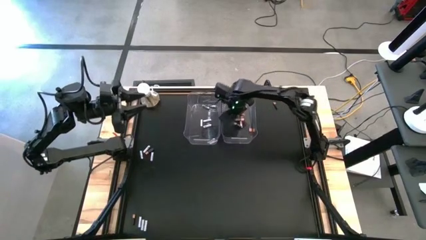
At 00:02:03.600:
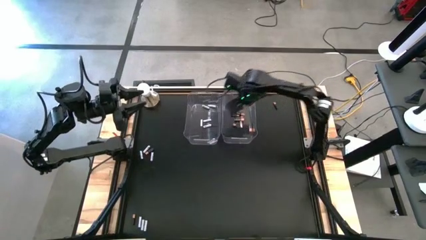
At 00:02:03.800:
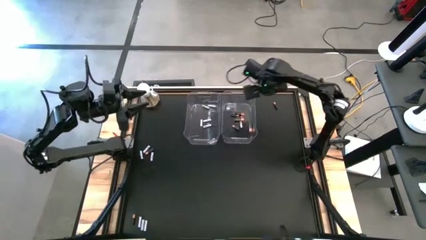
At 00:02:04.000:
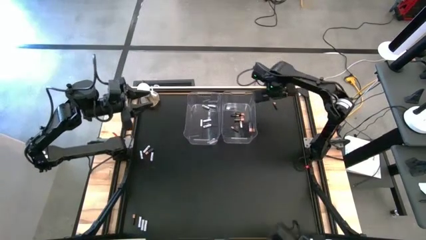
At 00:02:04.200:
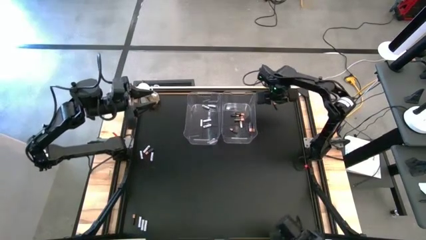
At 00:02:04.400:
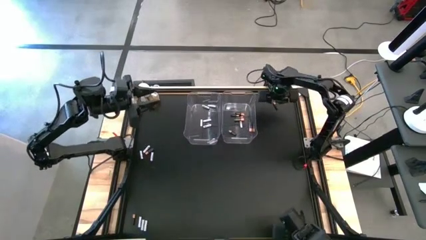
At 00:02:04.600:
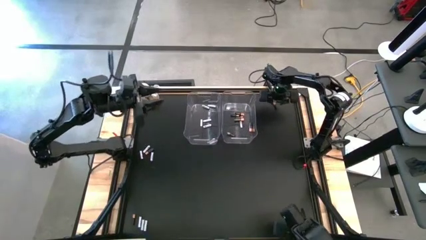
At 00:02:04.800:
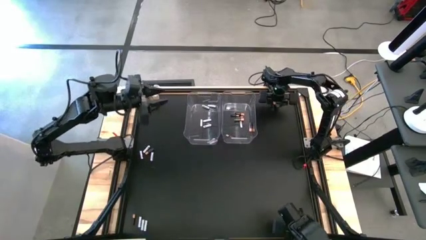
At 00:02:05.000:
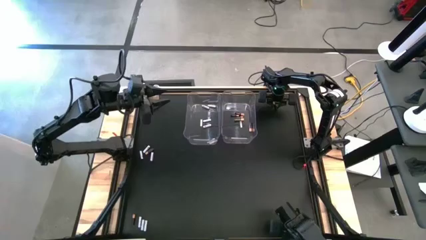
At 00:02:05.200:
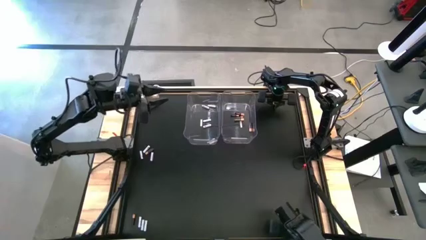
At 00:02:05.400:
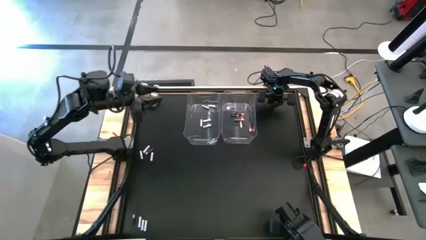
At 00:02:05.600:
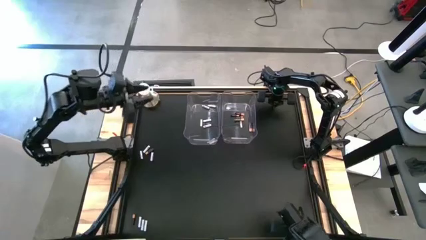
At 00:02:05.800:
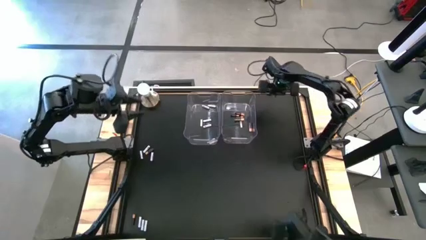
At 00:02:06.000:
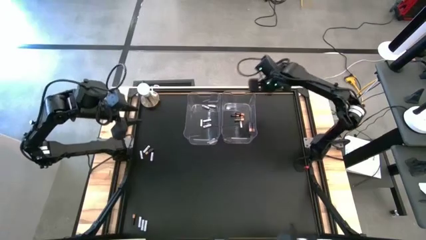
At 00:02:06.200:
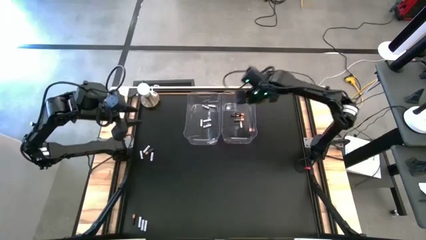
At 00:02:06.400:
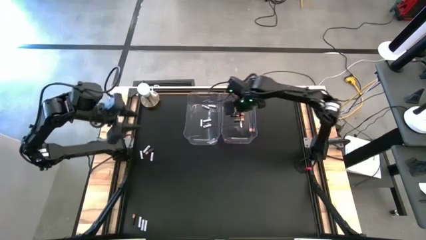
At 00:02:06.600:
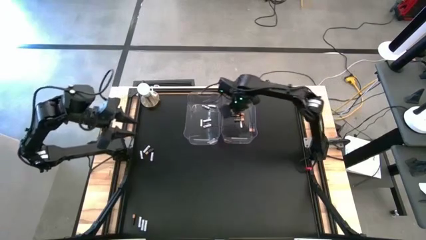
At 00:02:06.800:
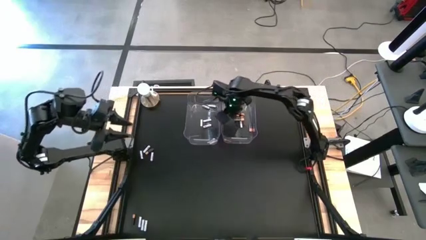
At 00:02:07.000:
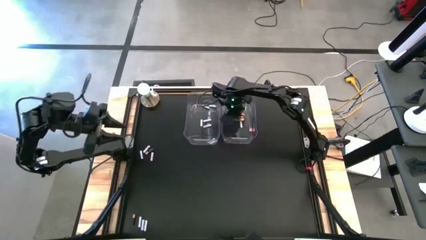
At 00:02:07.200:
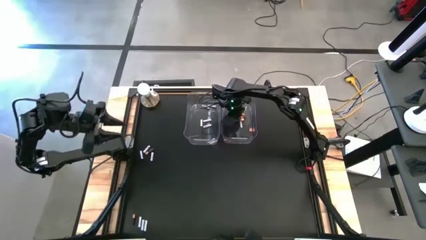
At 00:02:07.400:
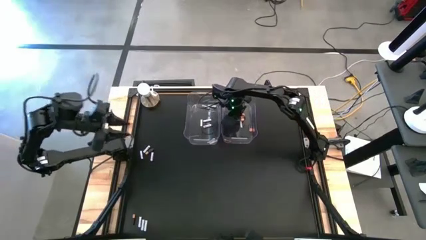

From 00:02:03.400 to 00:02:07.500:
Task: Sort batteries
Put the brown battery into the right transparent bin

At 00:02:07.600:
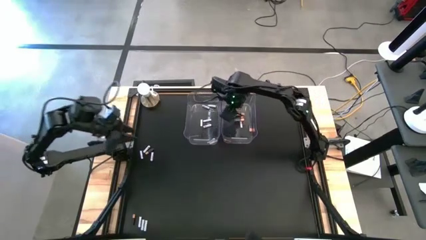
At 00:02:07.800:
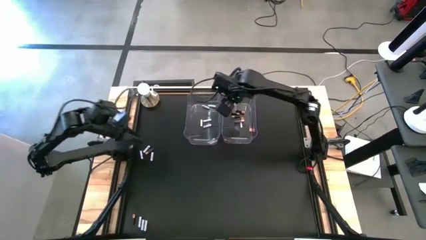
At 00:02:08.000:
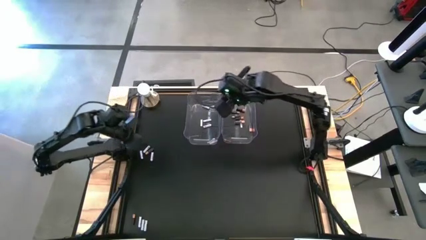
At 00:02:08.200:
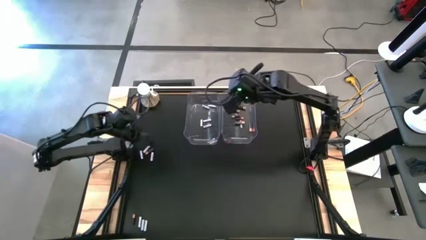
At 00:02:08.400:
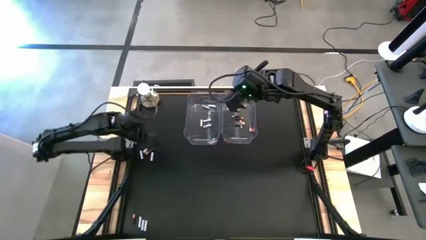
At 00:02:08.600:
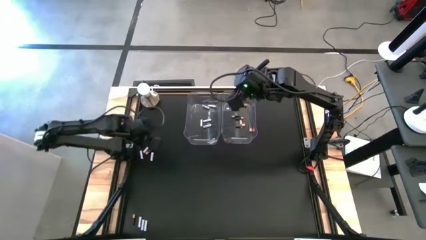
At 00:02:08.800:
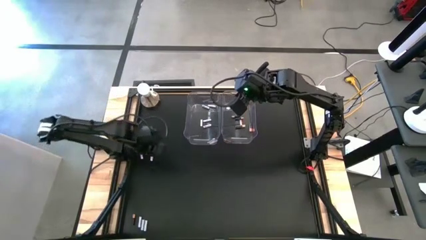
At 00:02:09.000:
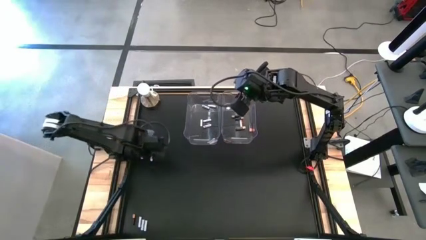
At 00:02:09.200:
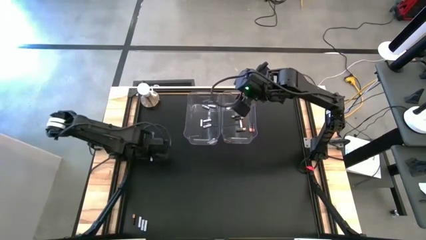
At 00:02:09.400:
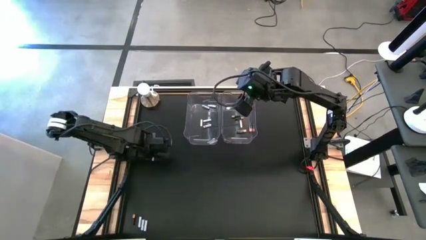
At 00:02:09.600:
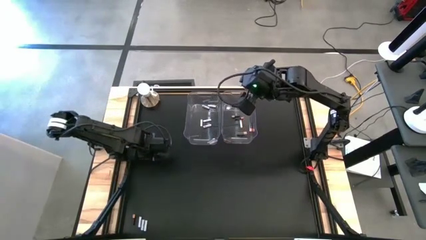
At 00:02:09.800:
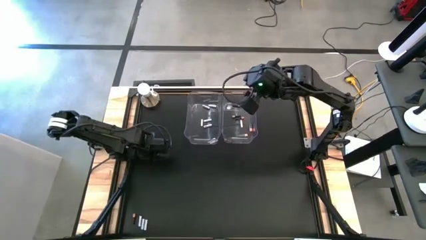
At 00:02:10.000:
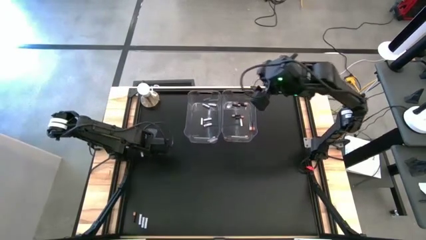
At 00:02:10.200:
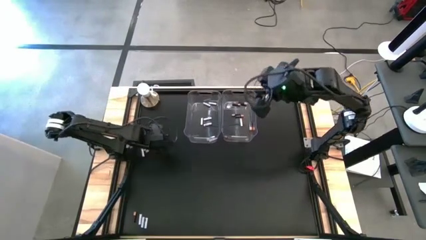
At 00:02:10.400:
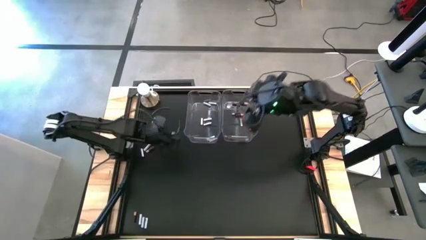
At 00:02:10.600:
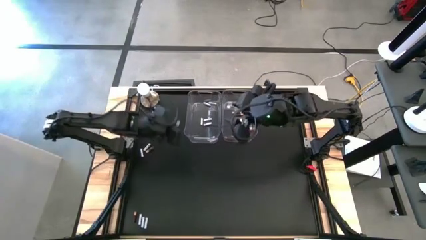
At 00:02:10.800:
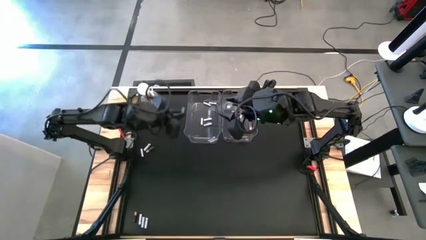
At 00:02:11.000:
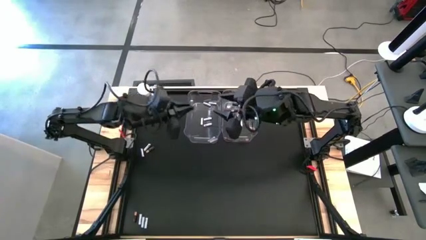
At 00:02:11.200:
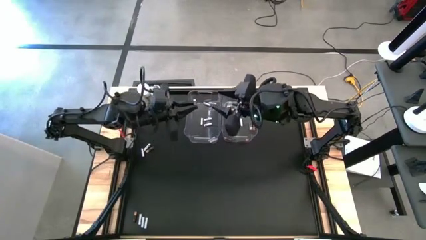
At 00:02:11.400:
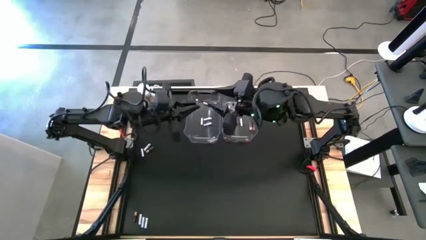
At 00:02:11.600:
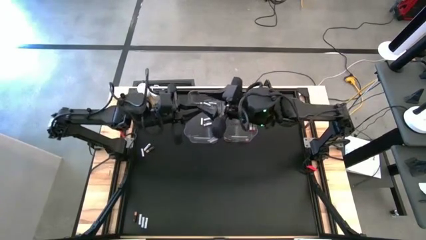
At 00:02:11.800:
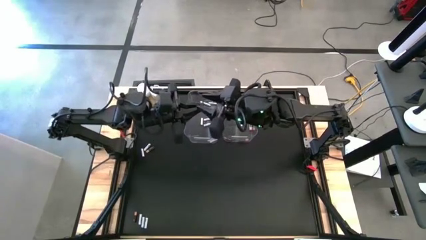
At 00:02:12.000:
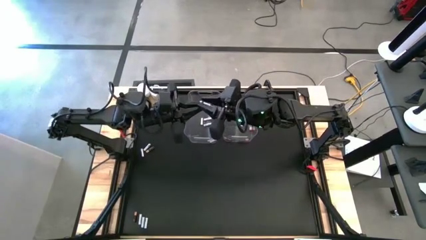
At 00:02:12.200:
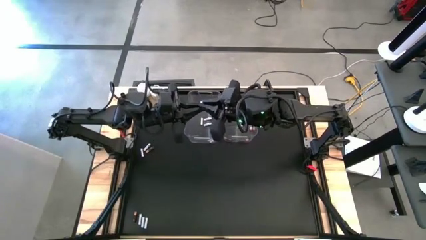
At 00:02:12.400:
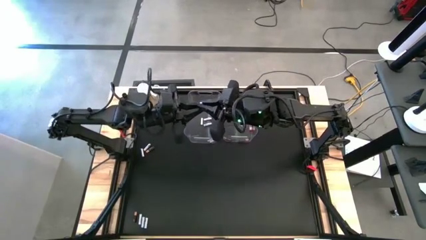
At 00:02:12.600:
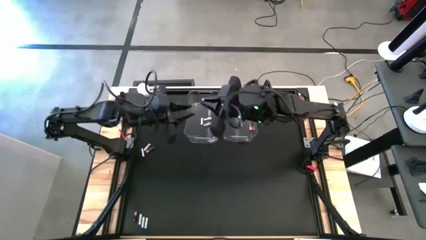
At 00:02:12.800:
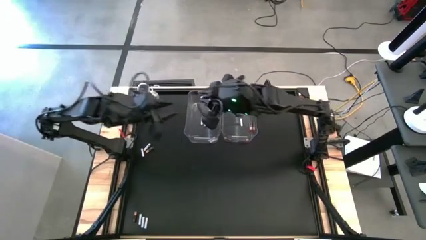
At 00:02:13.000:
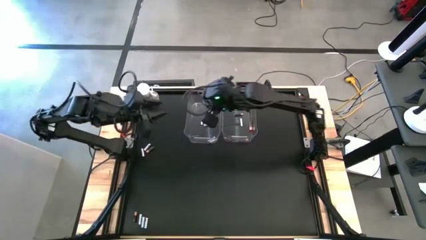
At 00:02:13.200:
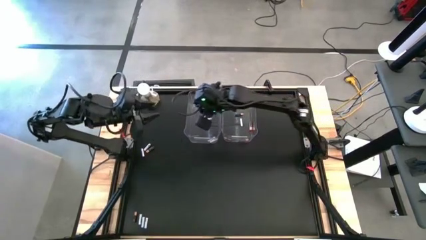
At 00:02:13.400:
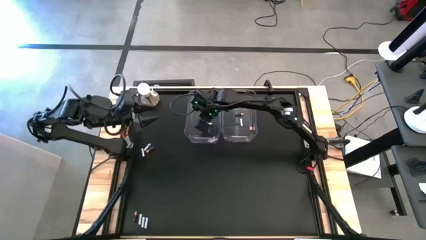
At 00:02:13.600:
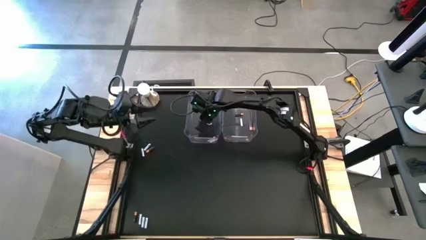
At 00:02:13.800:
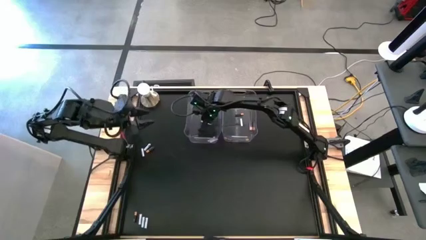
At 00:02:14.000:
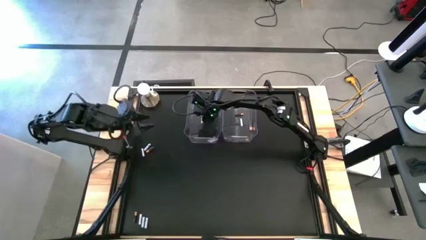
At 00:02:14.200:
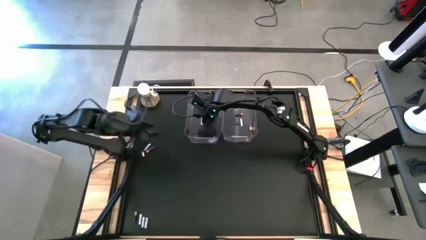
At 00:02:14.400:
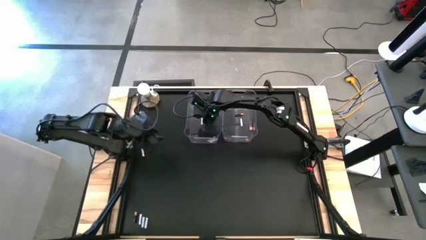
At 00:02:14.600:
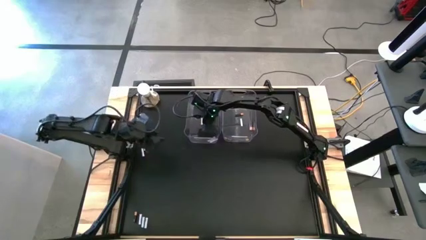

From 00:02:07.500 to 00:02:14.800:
Put the white battery into the left transparent bin

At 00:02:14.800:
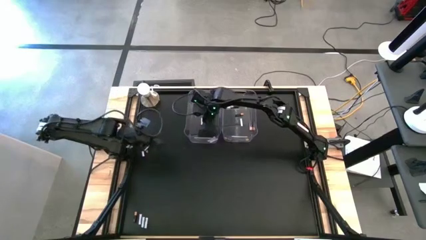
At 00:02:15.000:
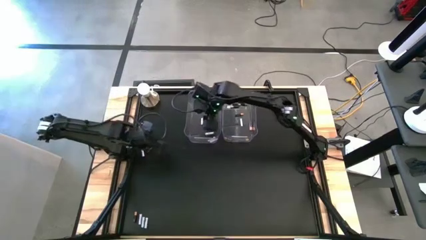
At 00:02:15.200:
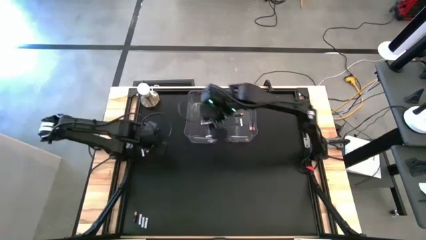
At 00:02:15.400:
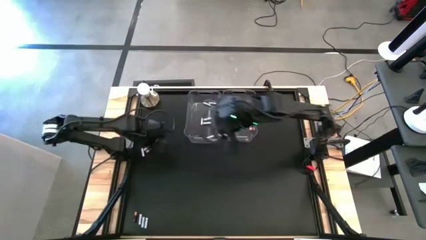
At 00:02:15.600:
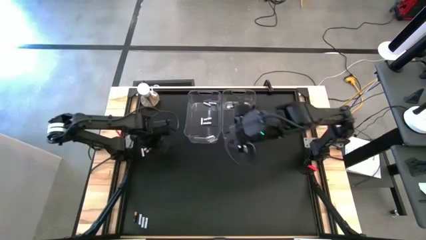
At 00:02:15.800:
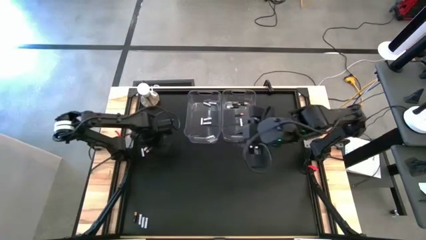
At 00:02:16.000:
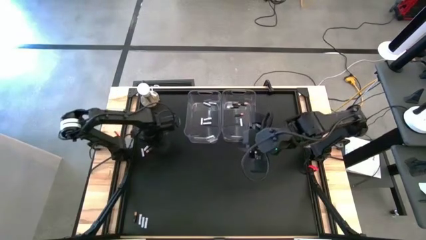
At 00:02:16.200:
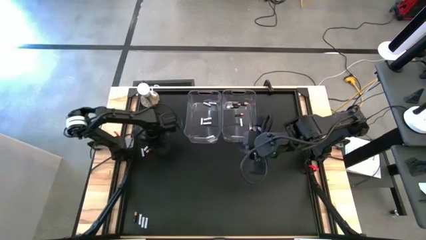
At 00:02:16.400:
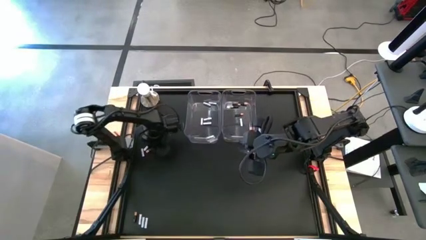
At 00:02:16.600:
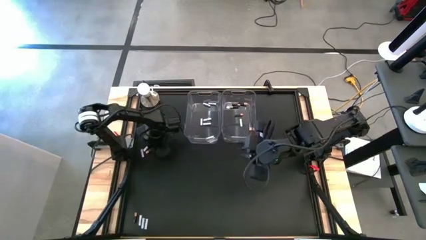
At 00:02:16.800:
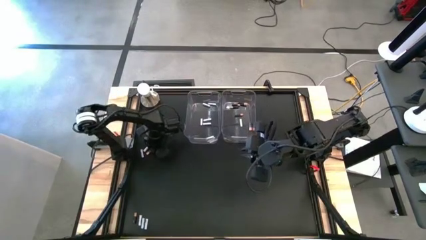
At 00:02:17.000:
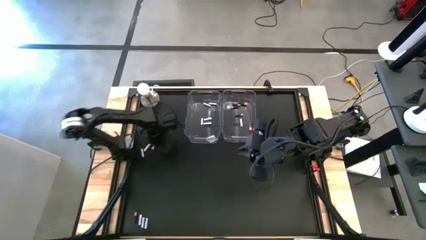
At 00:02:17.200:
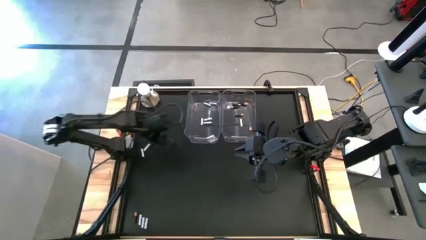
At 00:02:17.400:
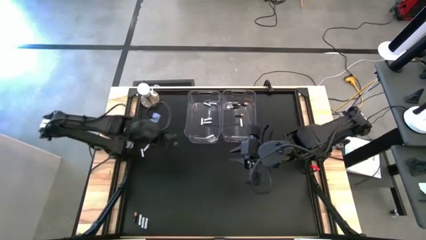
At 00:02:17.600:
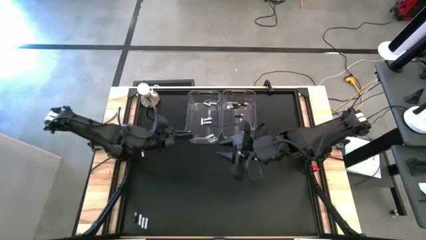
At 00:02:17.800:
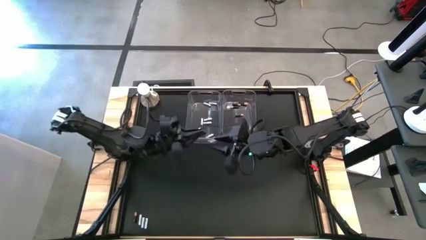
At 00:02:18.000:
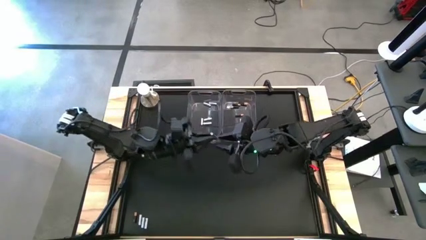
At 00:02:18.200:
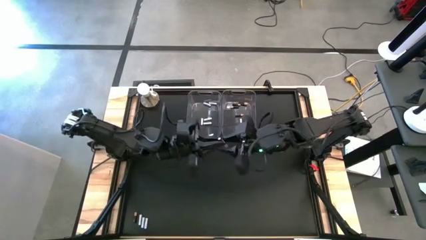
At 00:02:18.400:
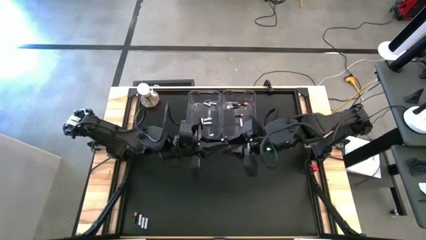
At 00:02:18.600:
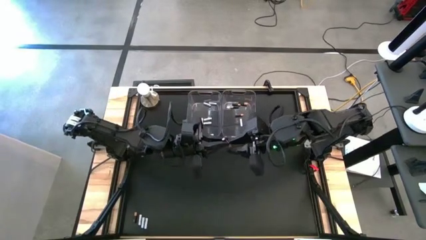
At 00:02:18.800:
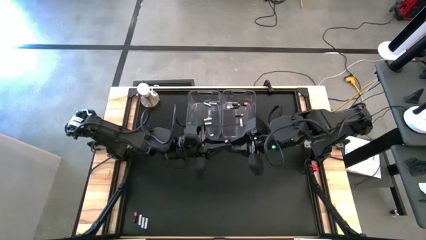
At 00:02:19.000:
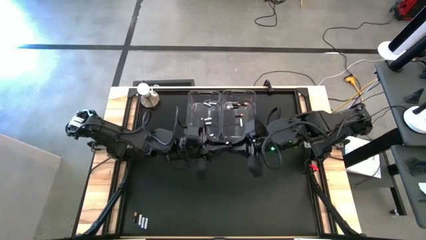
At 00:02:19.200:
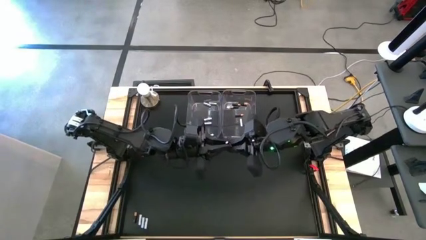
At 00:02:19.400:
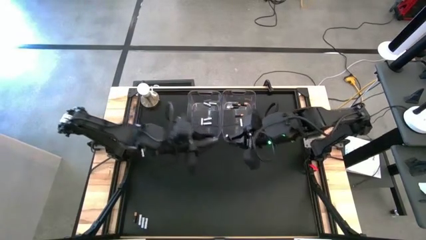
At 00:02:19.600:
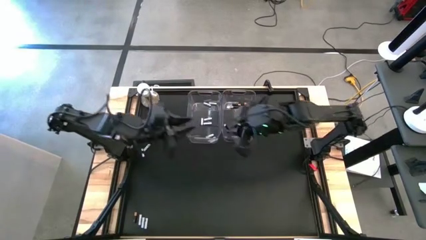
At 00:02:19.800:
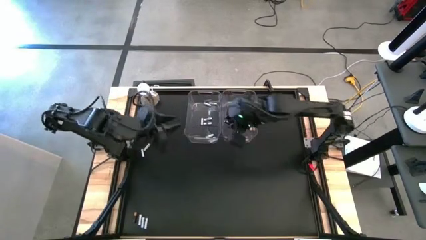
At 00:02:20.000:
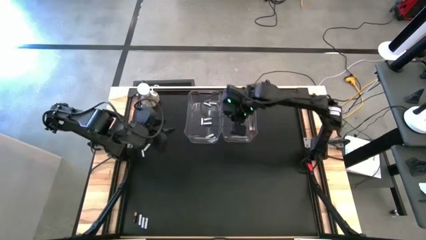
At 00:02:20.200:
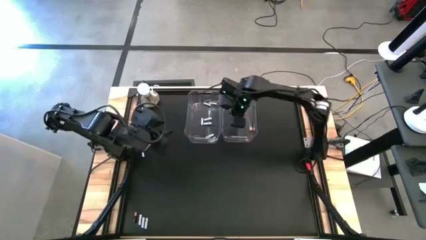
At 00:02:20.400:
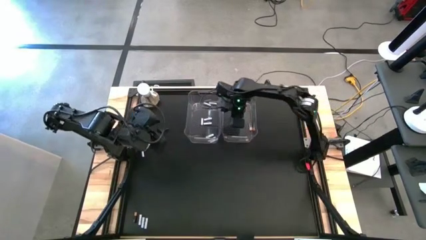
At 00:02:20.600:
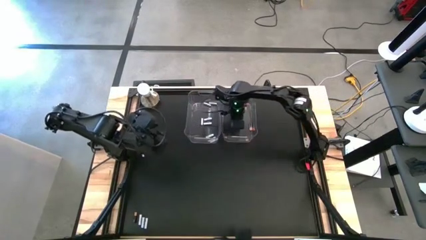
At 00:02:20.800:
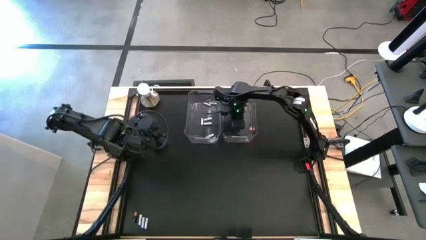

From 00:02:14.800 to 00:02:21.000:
Put the brown battery into the right transparent bin
